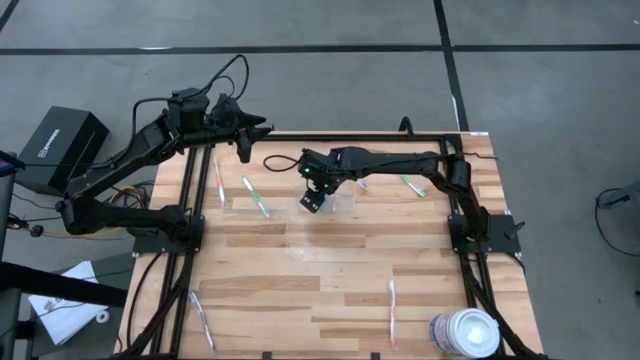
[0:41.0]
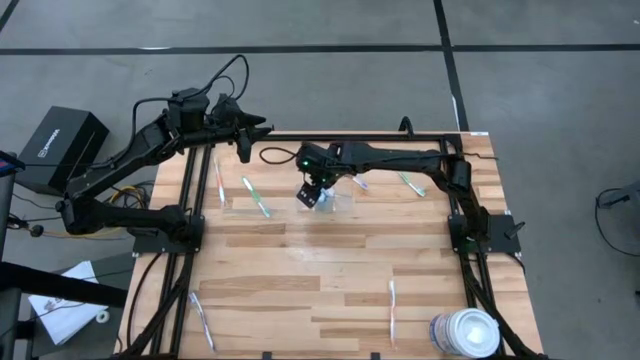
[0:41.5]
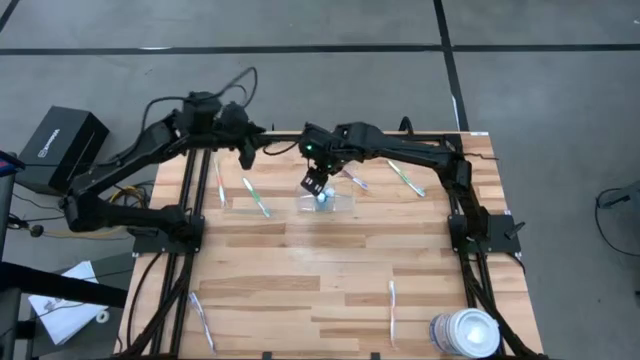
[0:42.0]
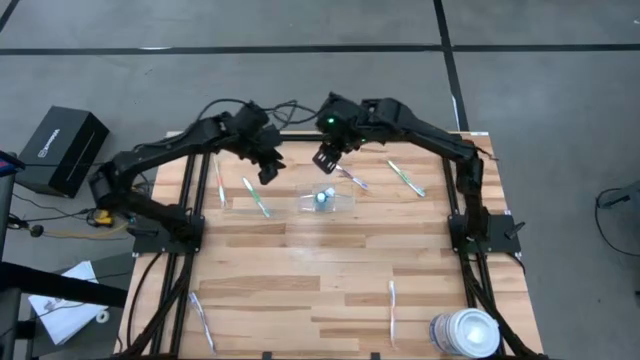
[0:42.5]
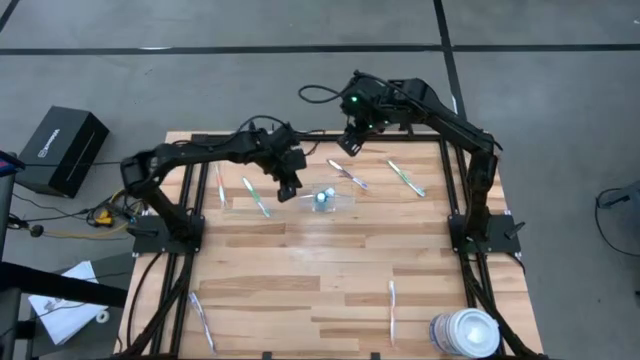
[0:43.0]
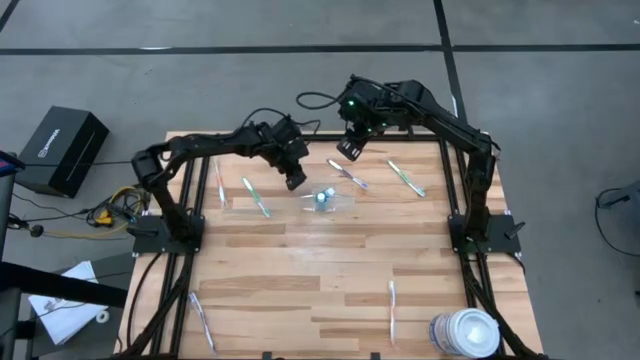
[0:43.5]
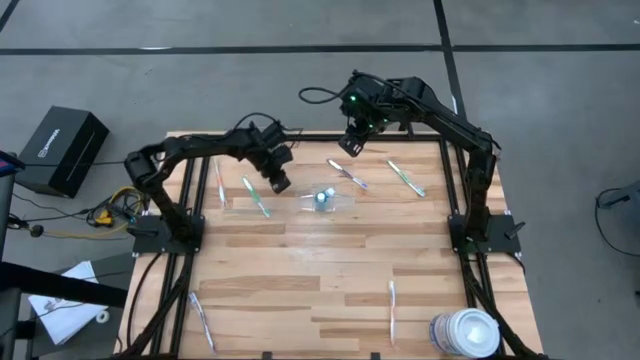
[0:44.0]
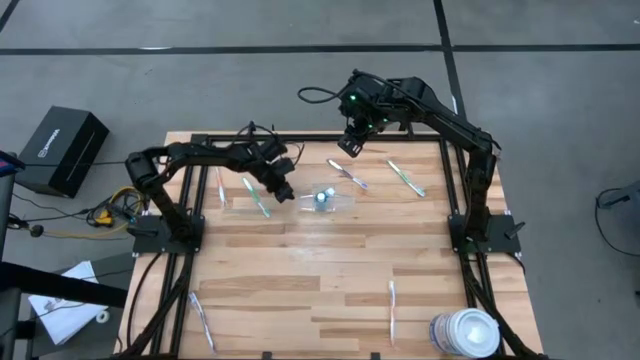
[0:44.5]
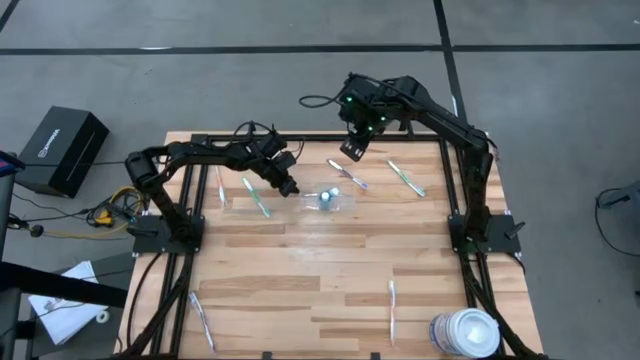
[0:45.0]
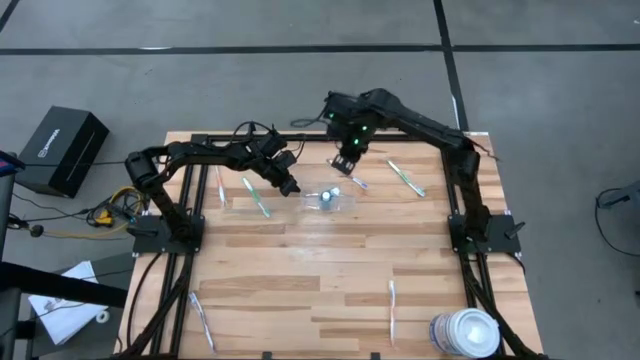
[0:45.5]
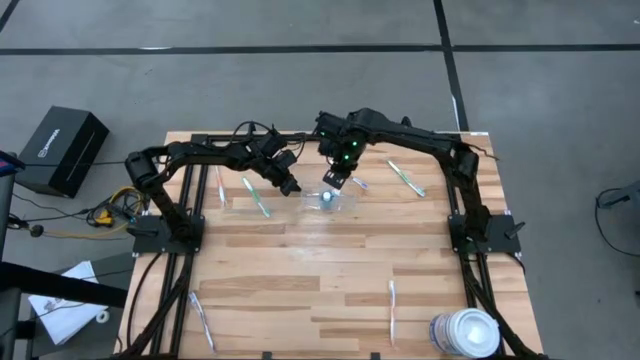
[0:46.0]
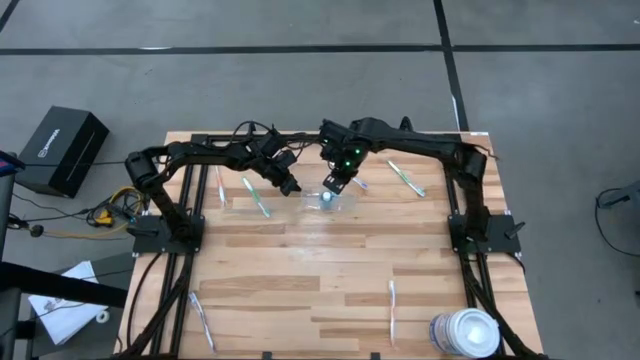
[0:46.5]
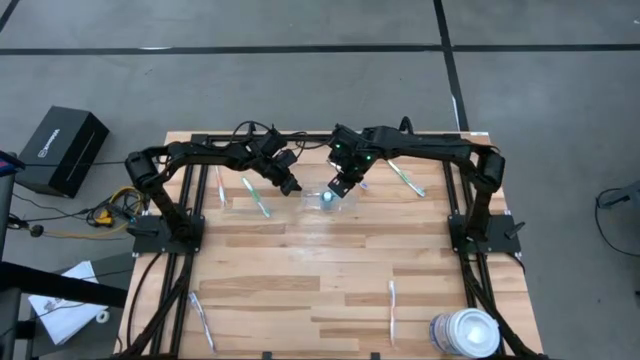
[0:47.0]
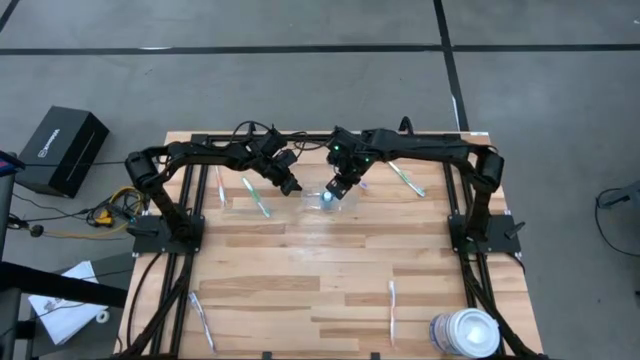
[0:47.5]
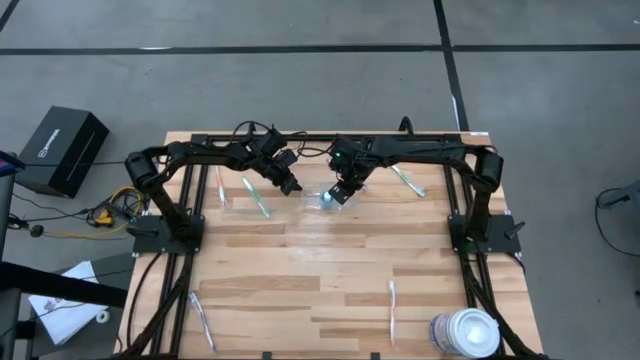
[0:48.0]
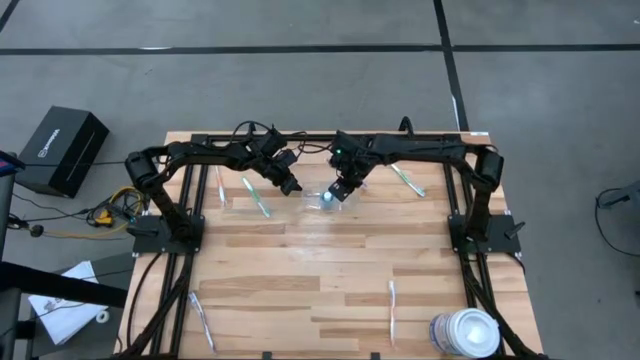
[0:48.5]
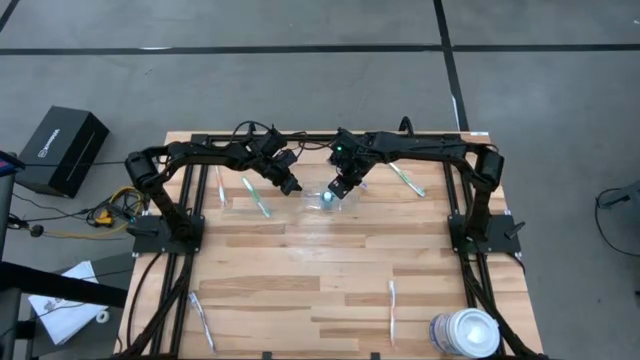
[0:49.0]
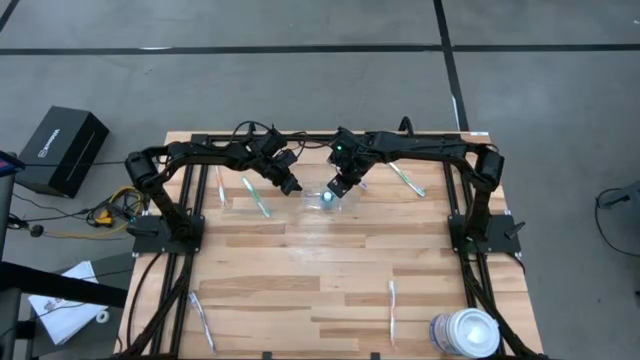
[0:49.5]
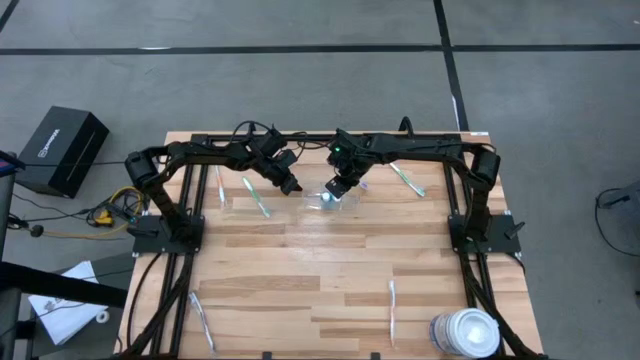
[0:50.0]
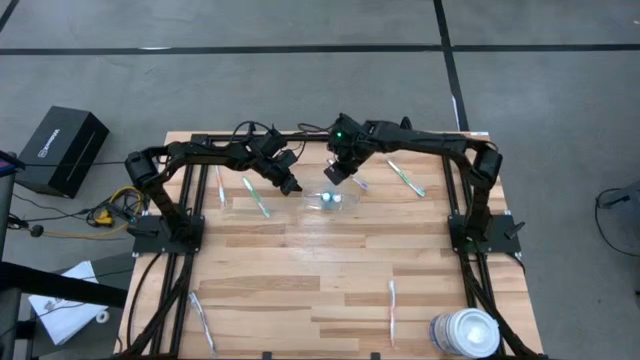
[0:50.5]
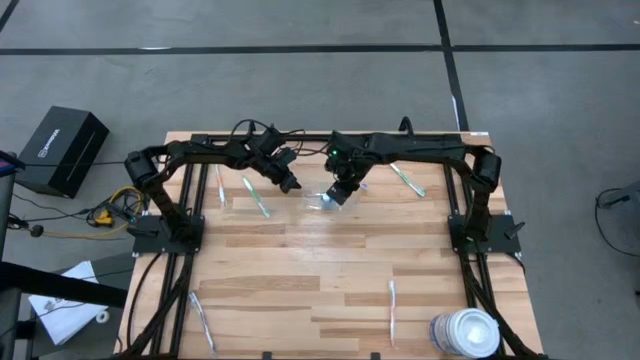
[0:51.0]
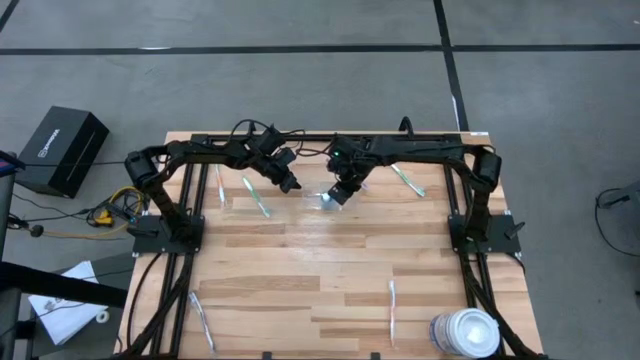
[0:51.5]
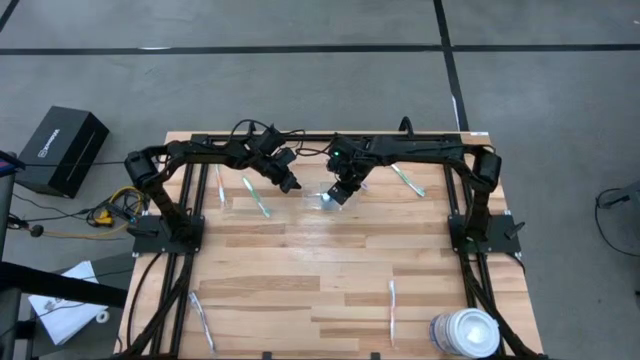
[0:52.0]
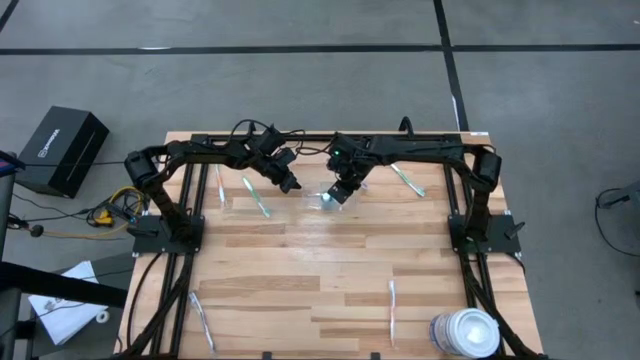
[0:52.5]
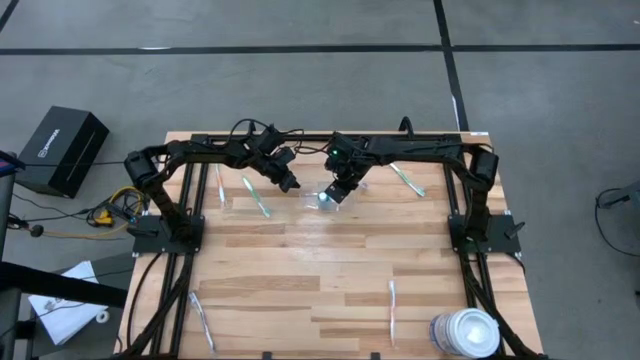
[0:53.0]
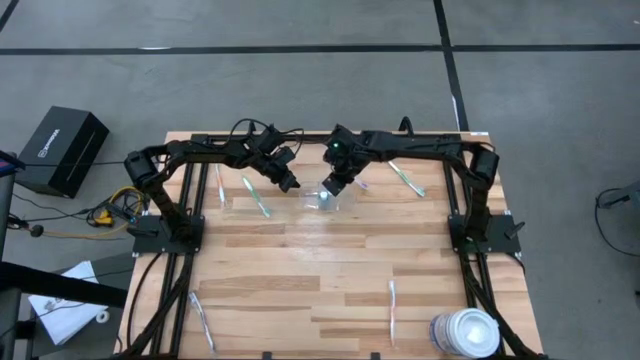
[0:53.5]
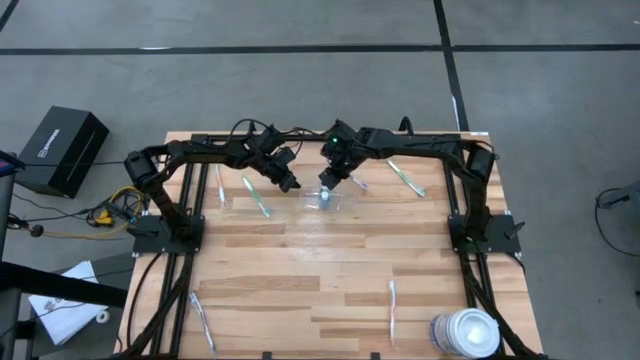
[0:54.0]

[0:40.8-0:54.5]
Task: Pick & Place toothbrushing station
Adjust the blue mouthwash in the transparent organizer

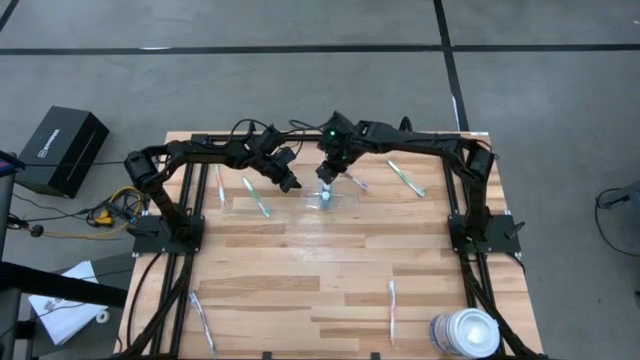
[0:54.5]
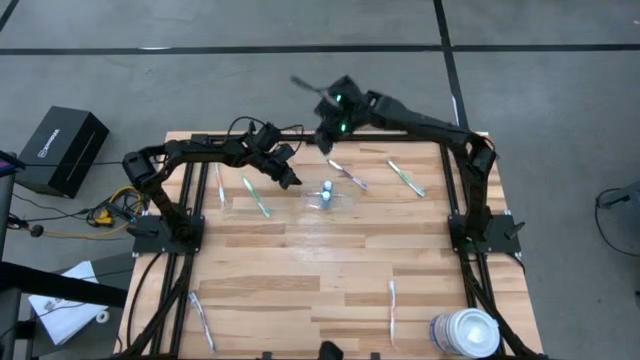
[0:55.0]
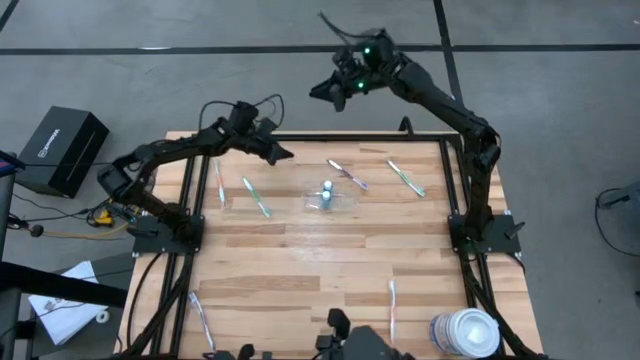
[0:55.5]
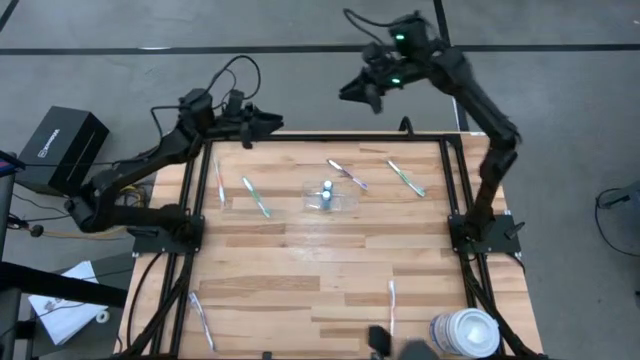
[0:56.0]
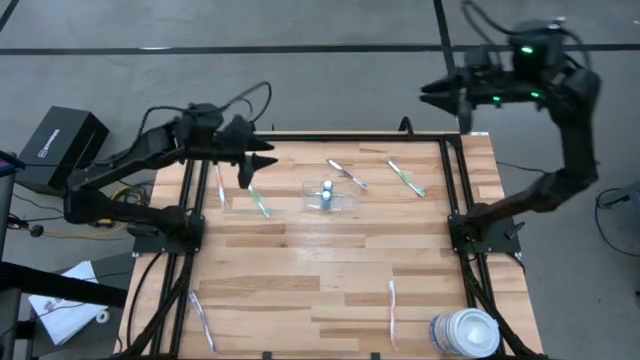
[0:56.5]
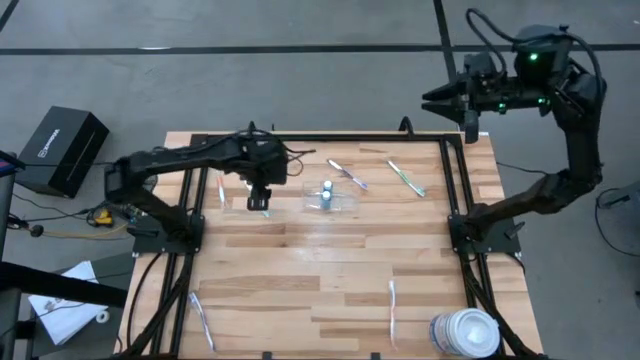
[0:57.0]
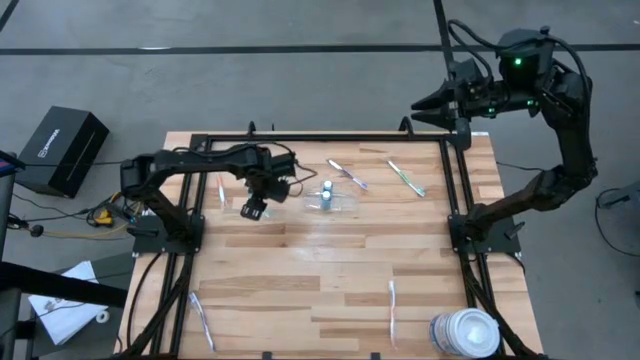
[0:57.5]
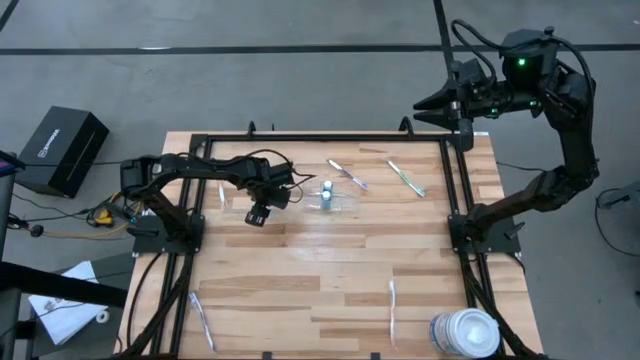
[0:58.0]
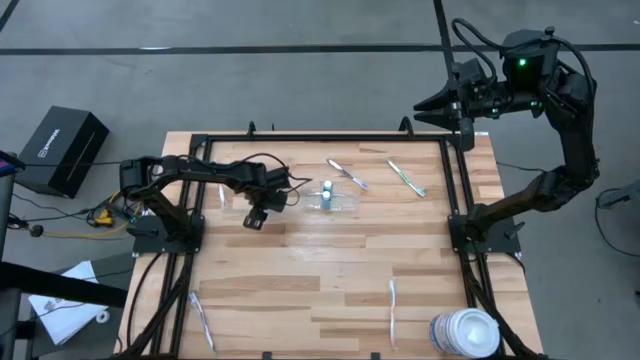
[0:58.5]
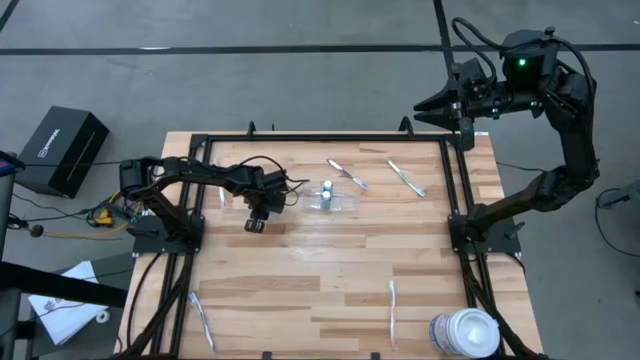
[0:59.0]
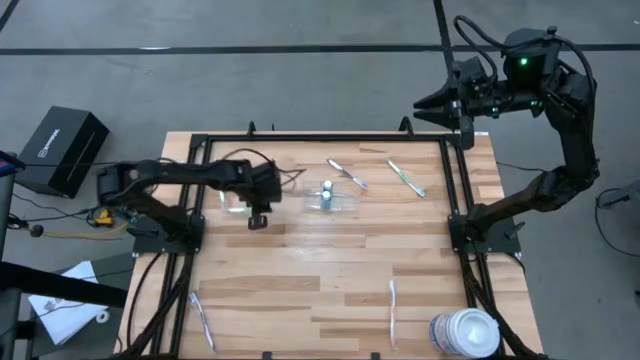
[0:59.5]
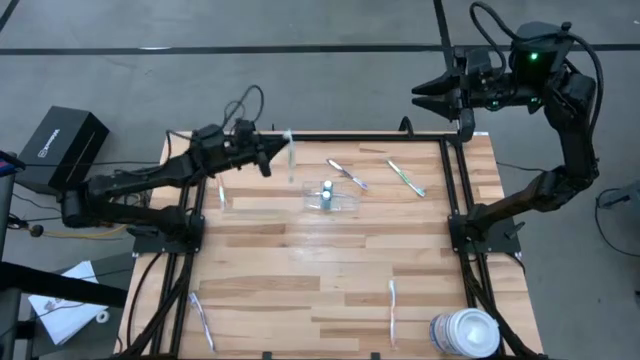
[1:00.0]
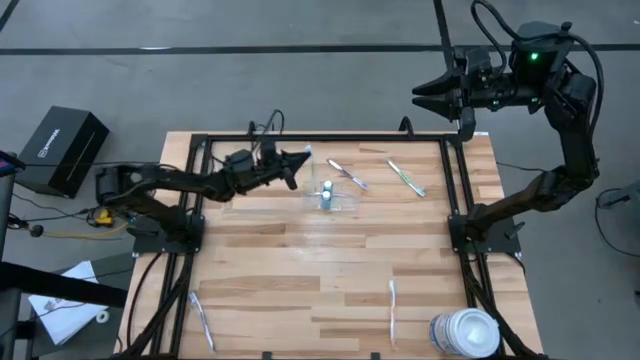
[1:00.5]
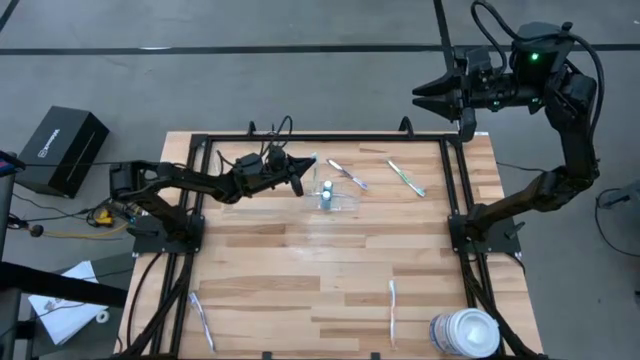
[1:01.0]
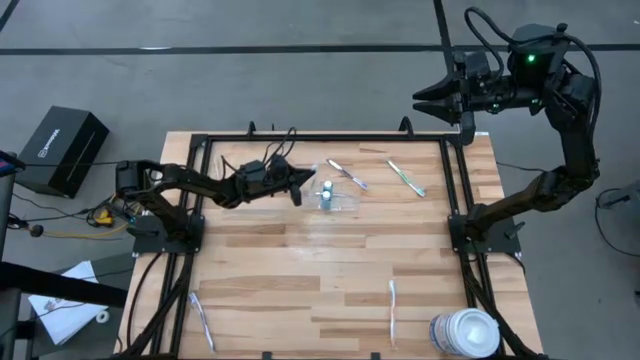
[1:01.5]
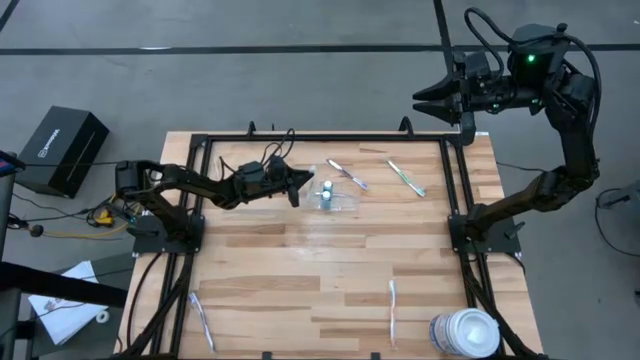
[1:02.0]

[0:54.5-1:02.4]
Put the left green toothbrush into the transparent organizer
